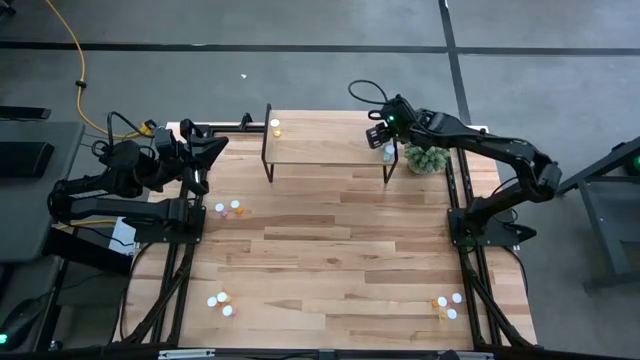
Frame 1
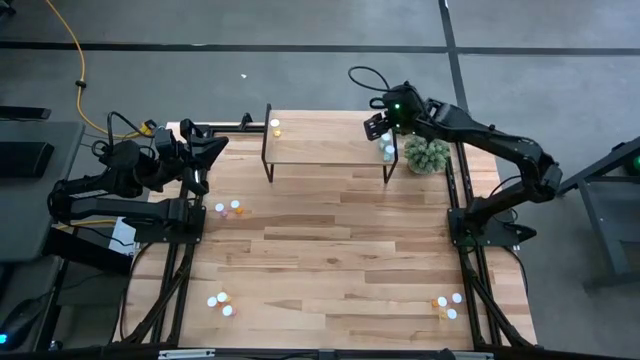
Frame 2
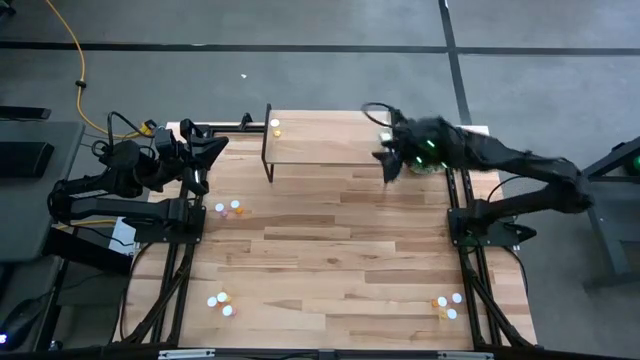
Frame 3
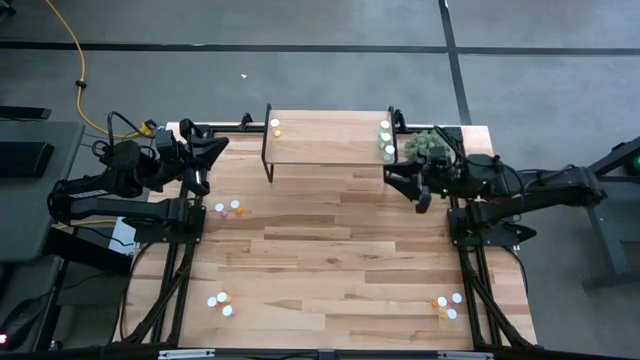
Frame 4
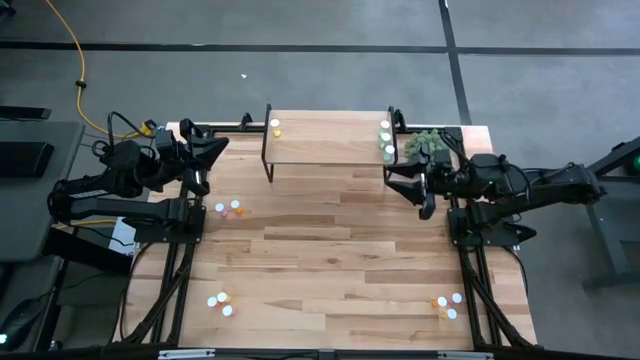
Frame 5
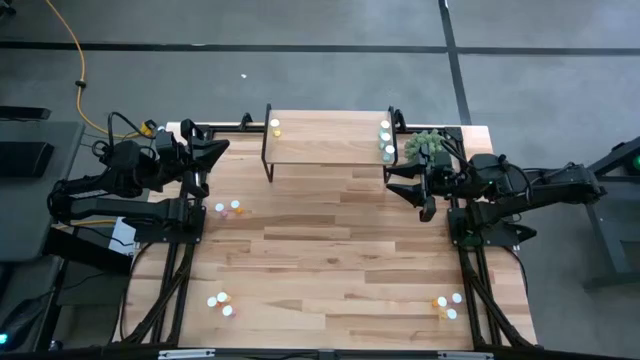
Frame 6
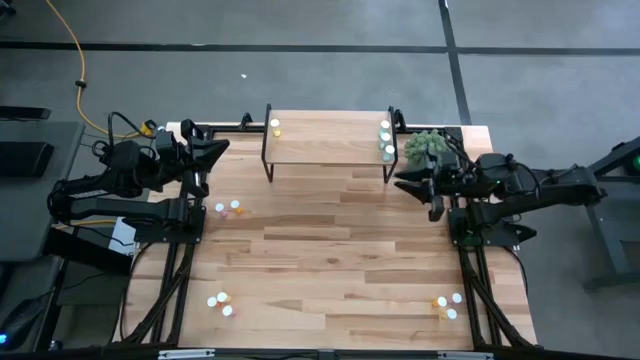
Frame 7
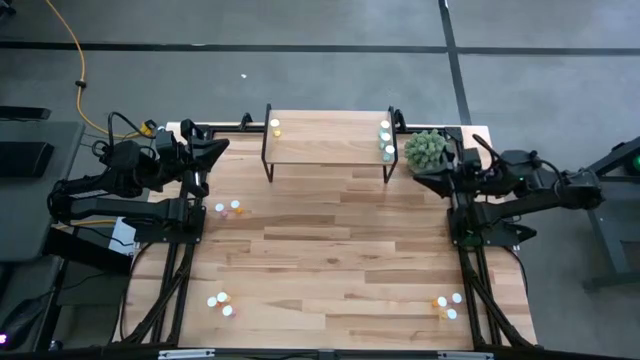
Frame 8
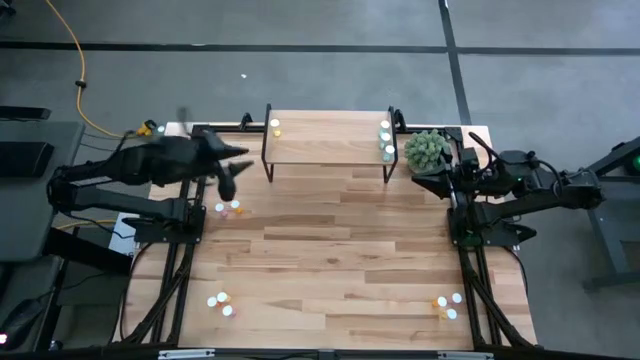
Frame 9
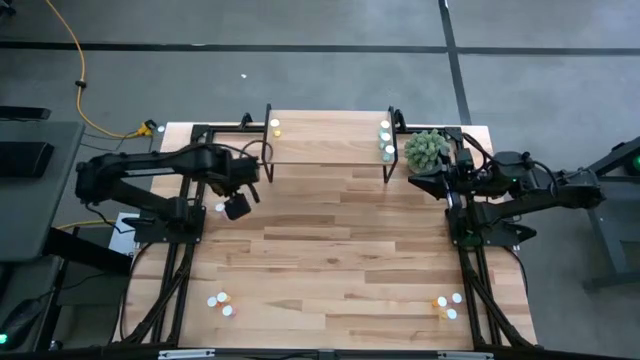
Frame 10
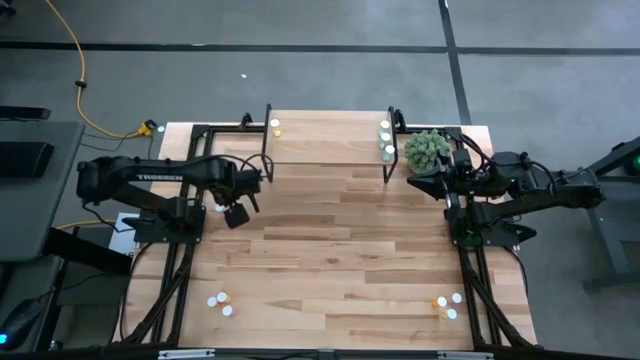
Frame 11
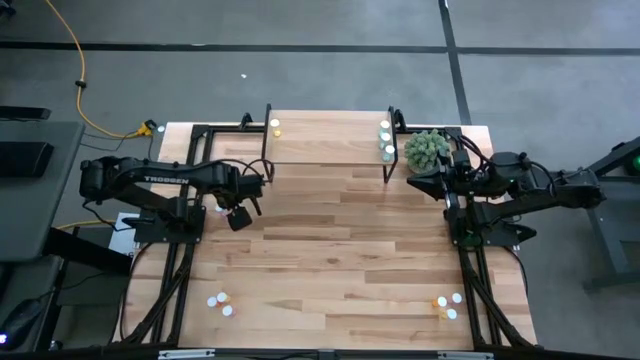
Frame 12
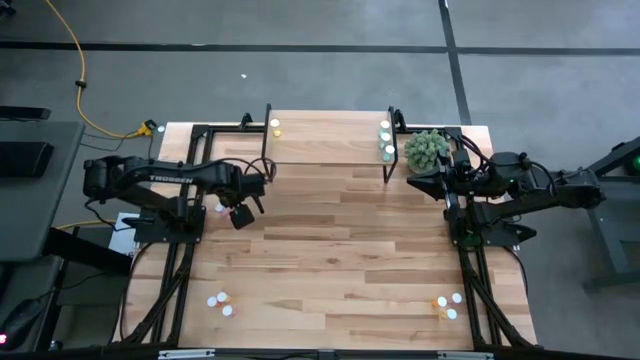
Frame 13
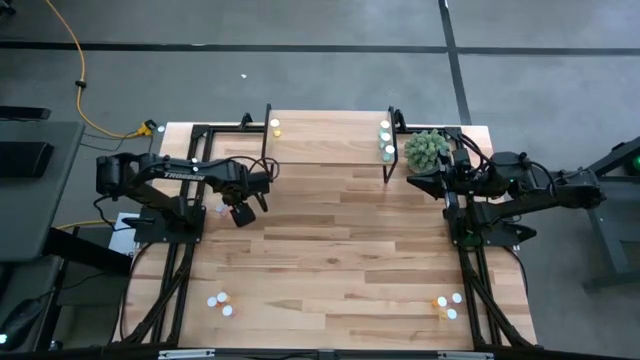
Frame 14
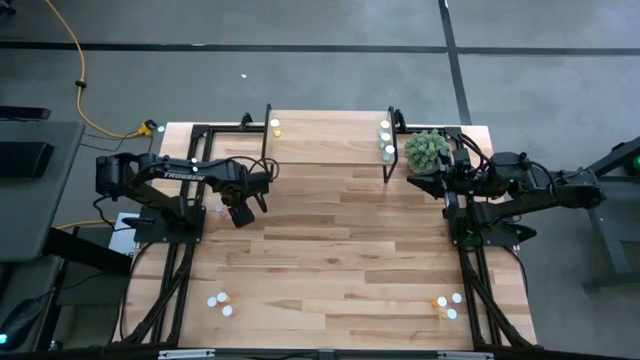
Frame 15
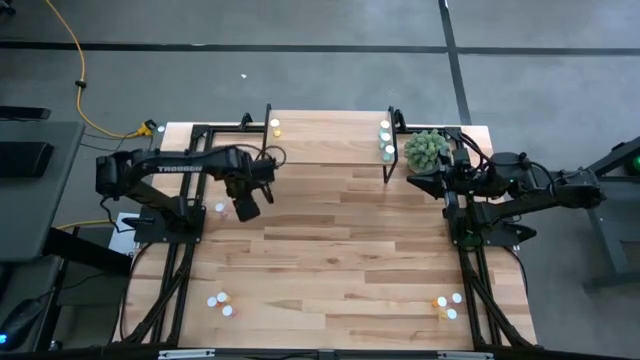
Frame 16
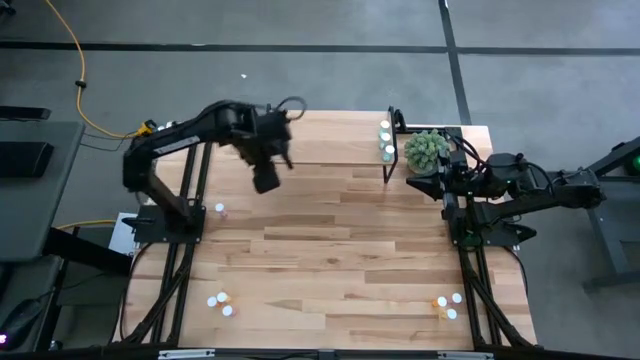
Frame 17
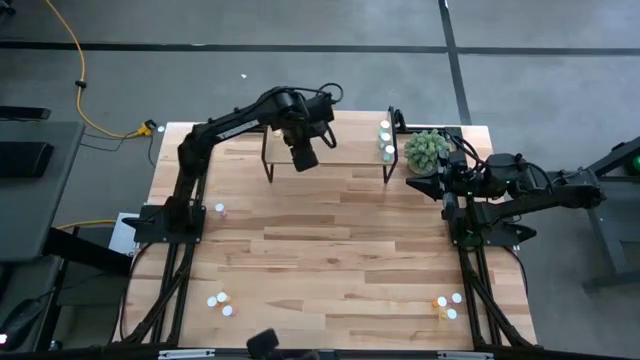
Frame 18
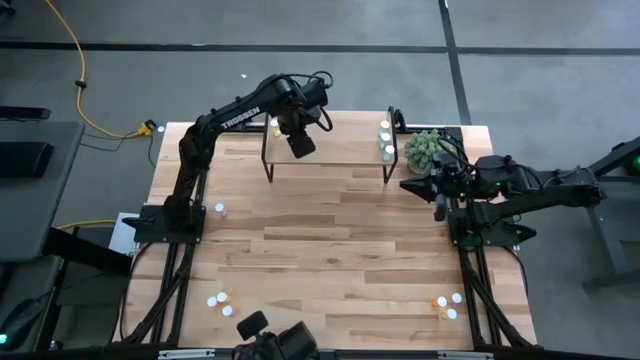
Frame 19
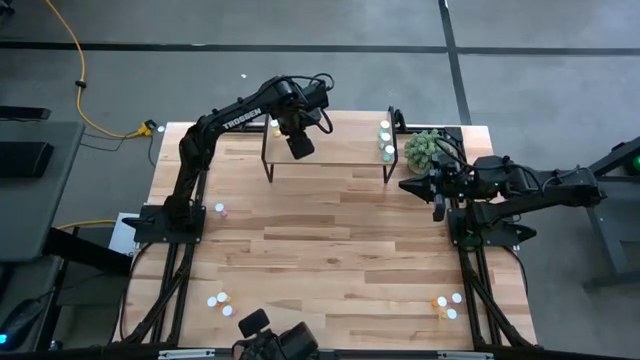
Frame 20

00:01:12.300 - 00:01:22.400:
Task: Pick and place medicine bottles onto shelf by color
Put the top orange pill bottle on the shelf

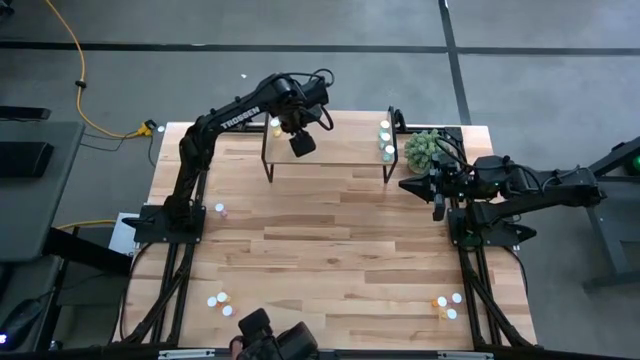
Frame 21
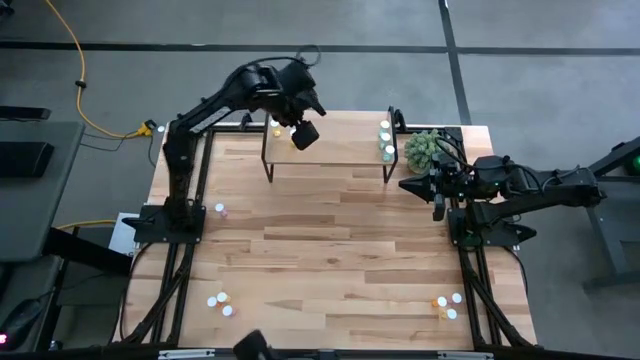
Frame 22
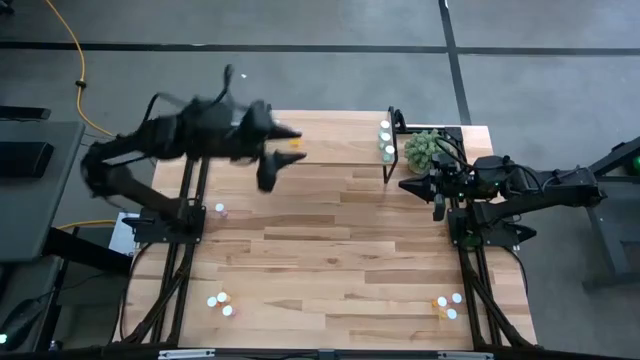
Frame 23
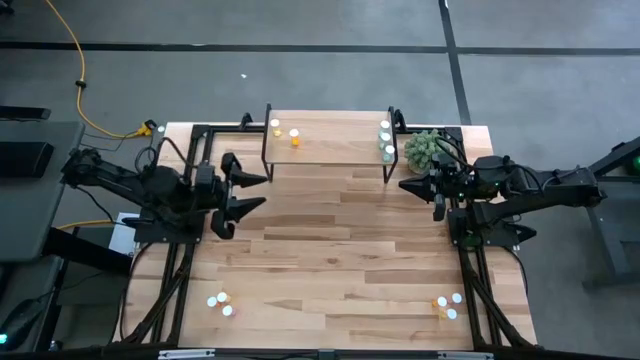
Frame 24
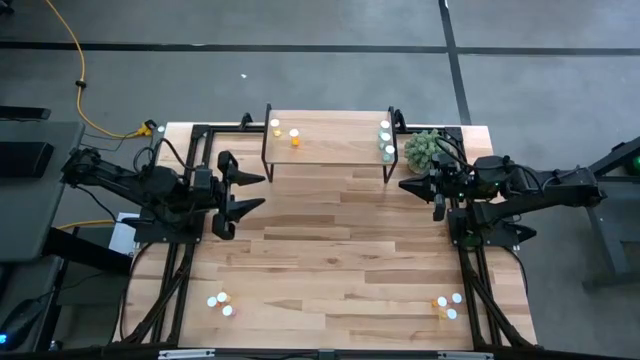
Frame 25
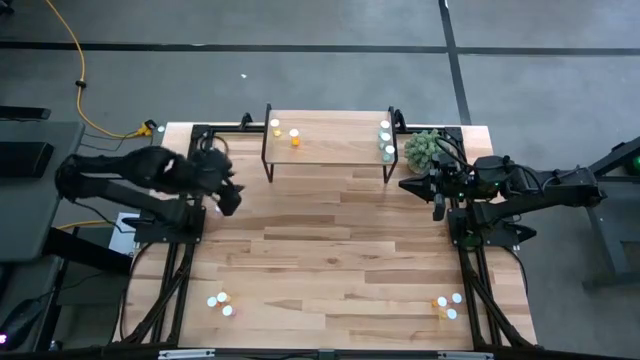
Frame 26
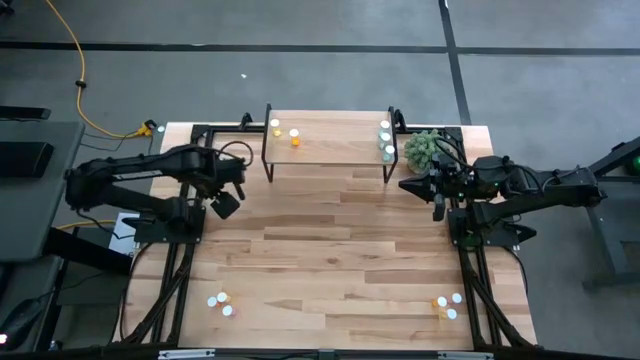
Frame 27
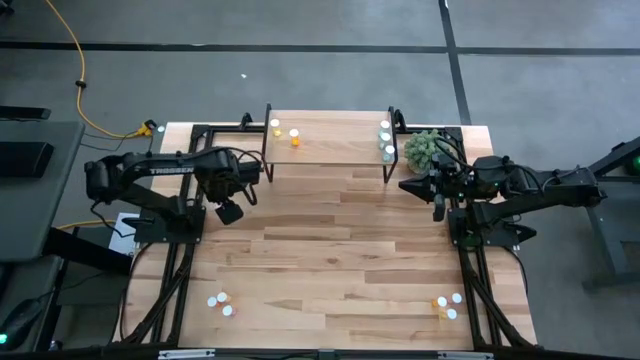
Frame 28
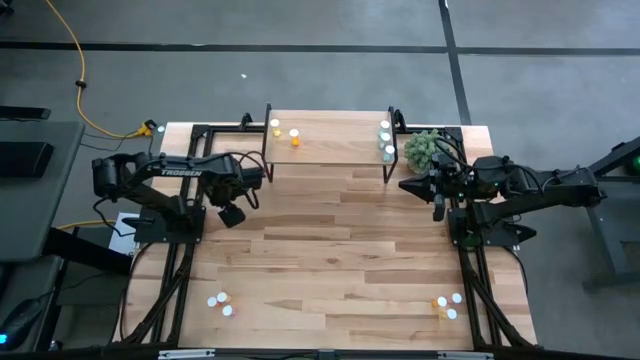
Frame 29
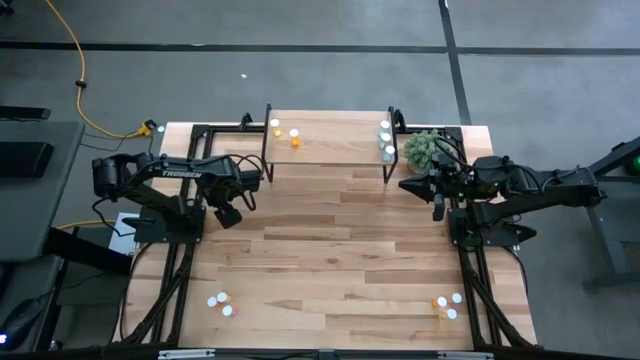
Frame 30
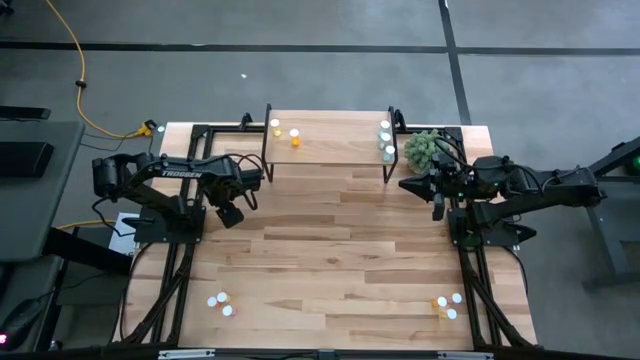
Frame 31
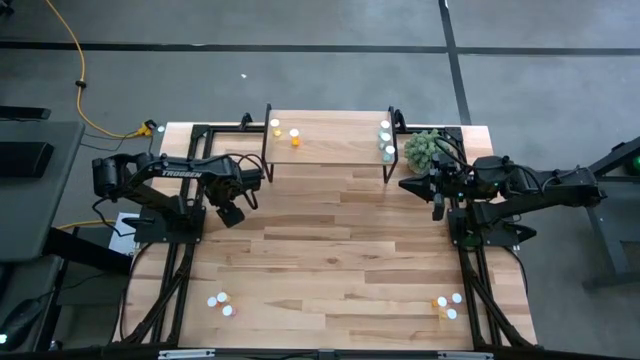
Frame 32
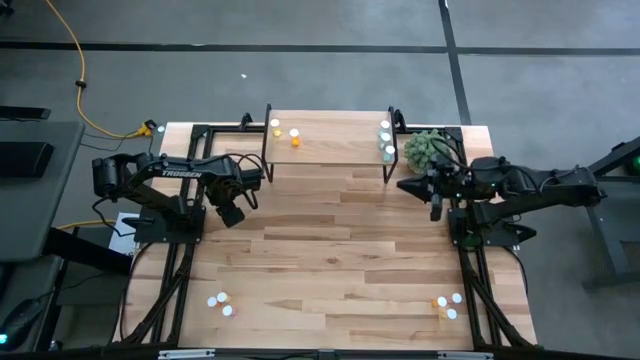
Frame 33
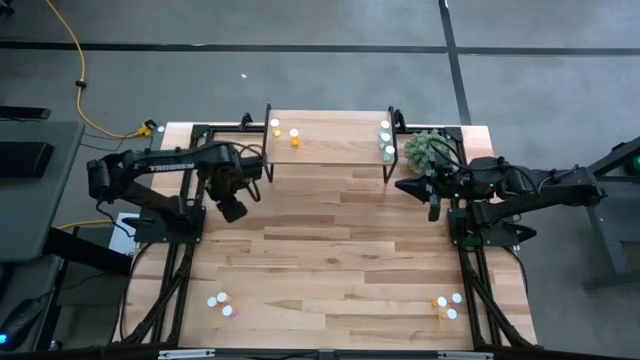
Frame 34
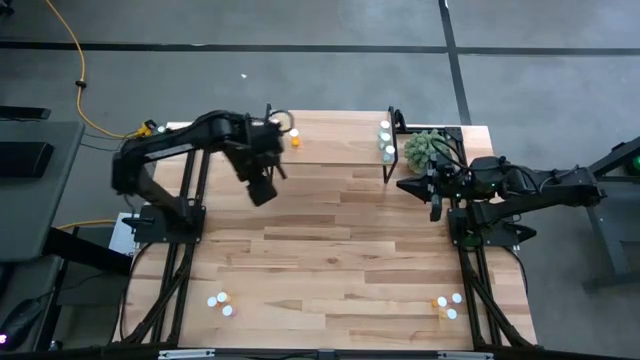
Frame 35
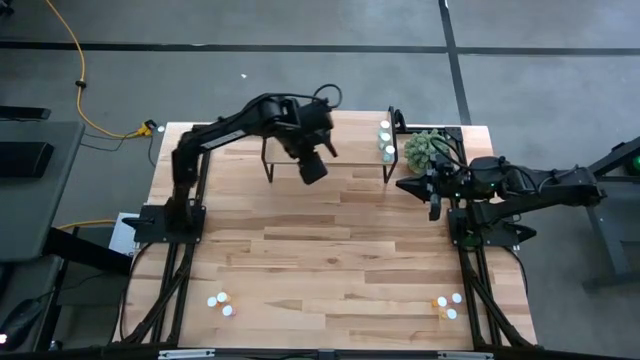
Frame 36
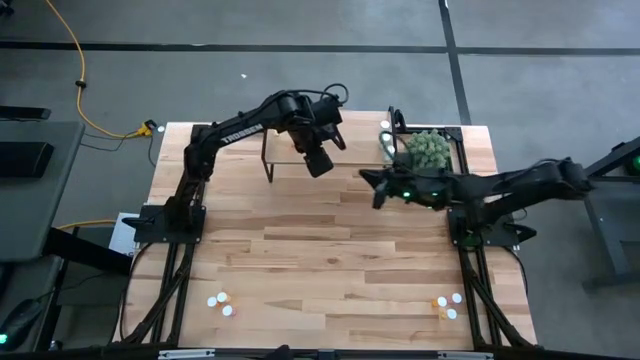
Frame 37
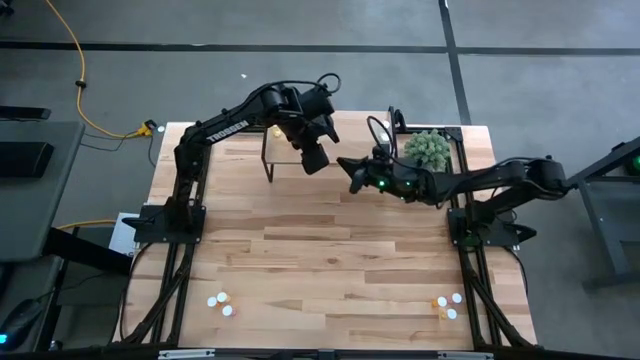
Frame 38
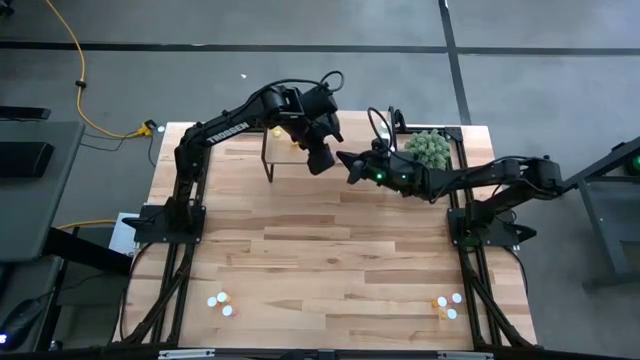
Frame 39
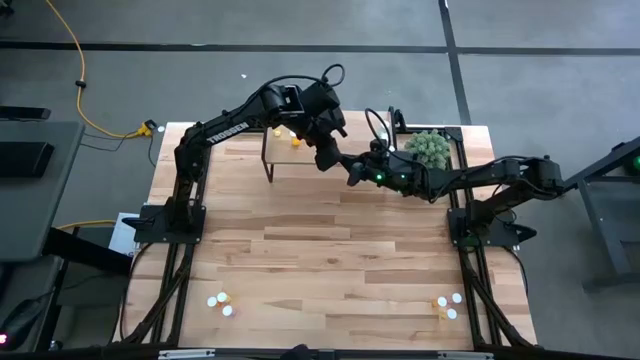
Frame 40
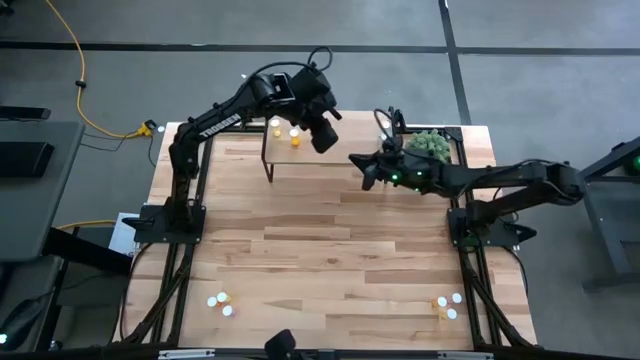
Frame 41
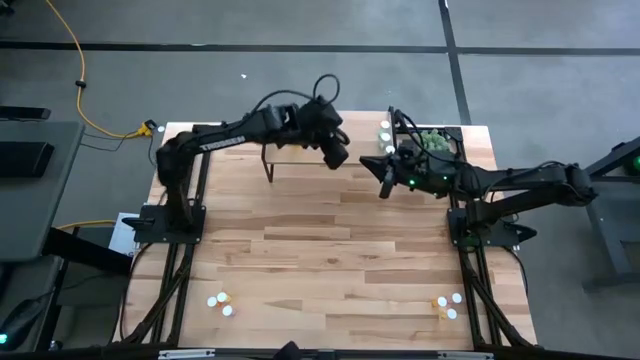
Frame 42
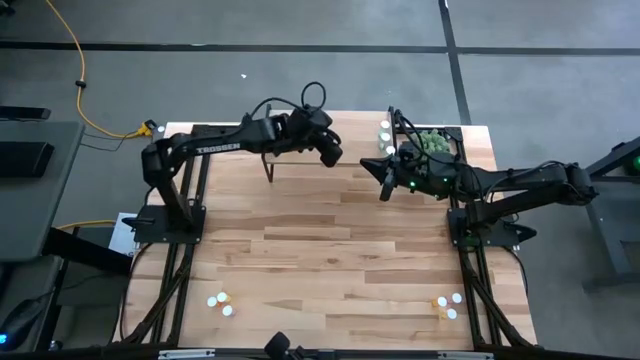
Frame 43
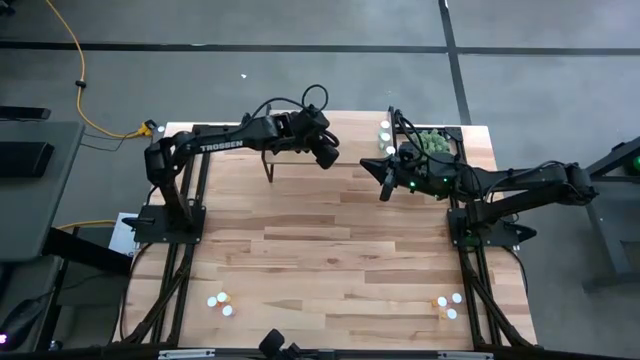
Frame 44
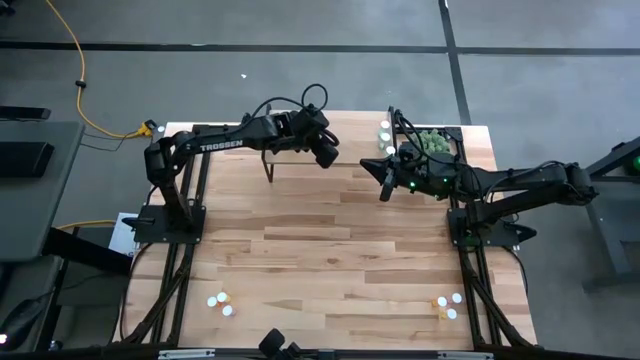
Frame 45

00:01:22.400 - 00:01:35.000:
Put the top pink pill bottle on the shelf

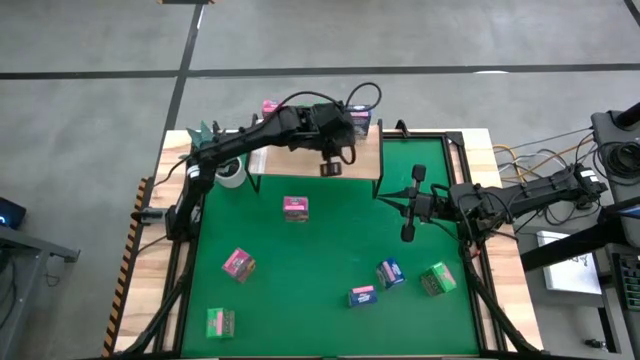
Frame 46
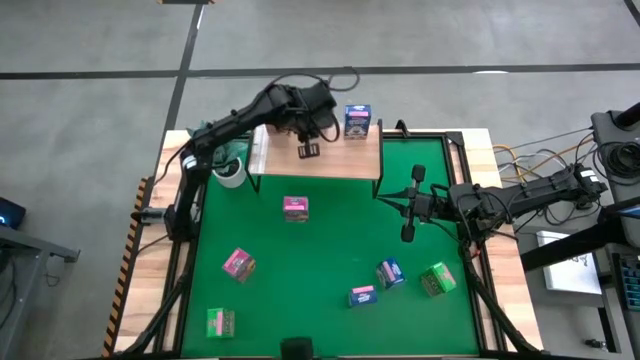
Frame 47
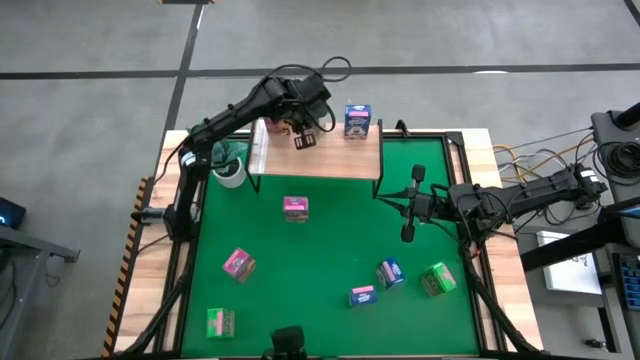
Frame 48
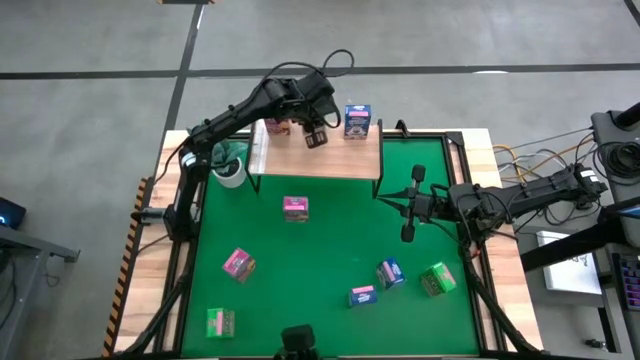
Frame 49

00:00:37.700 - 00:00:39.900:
Task: Stack cereal on shelf
Adjust the green cereal box on the shelf
